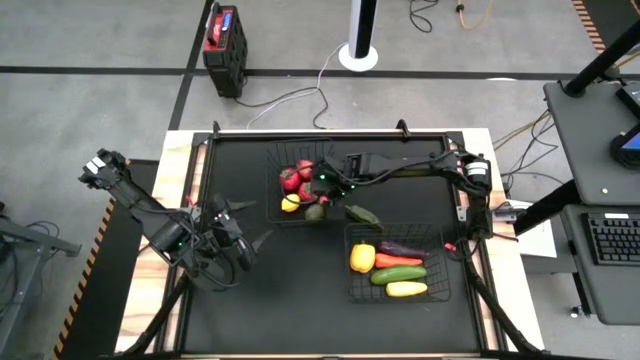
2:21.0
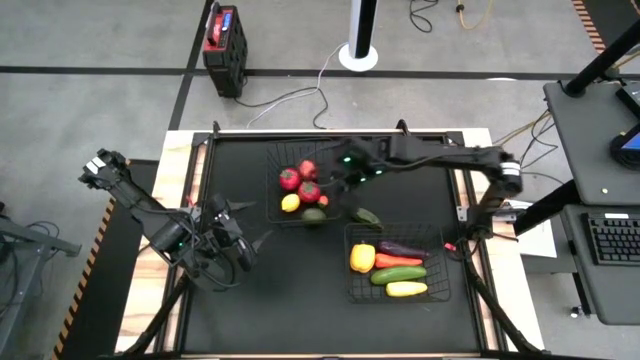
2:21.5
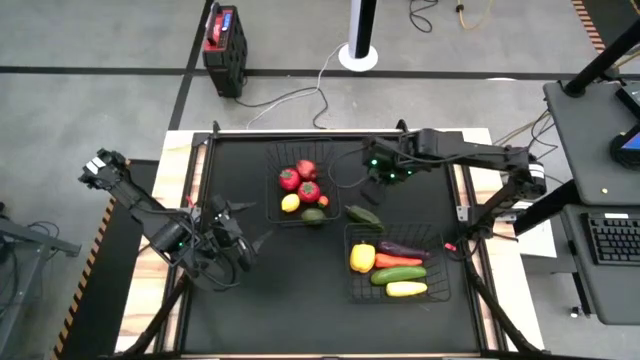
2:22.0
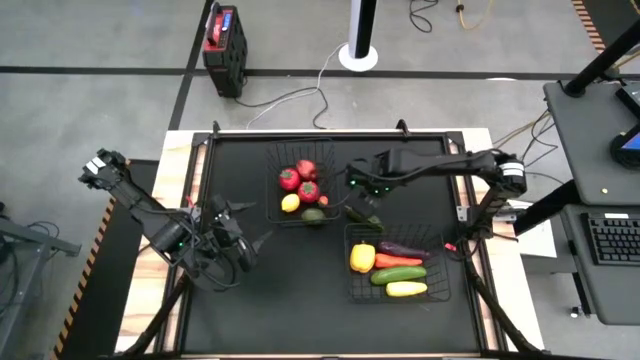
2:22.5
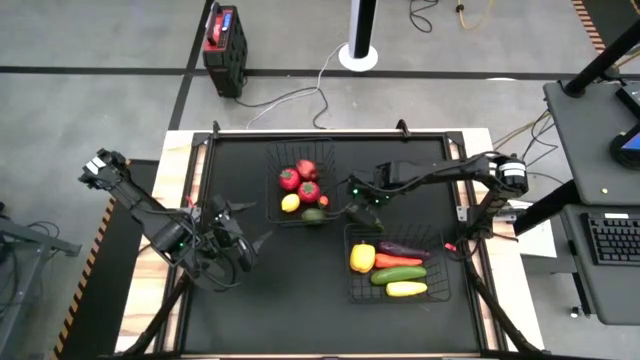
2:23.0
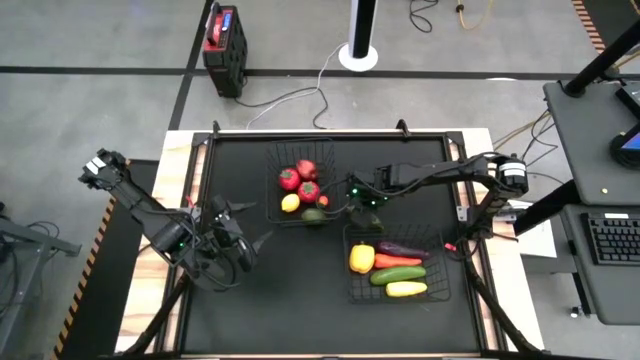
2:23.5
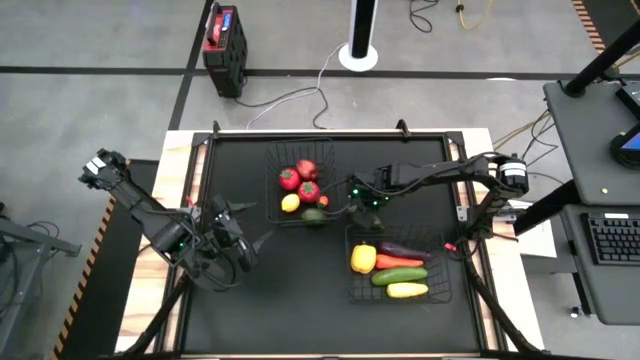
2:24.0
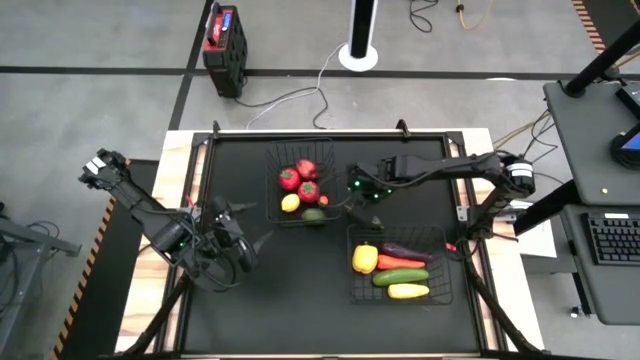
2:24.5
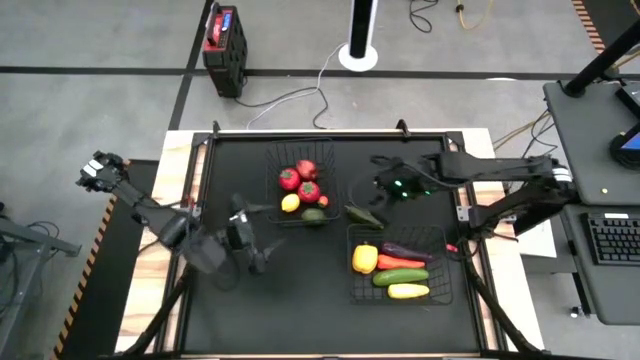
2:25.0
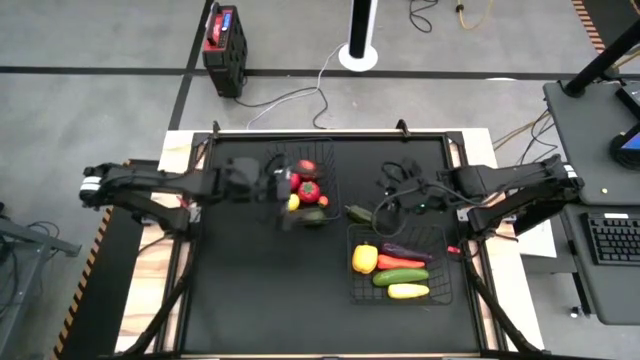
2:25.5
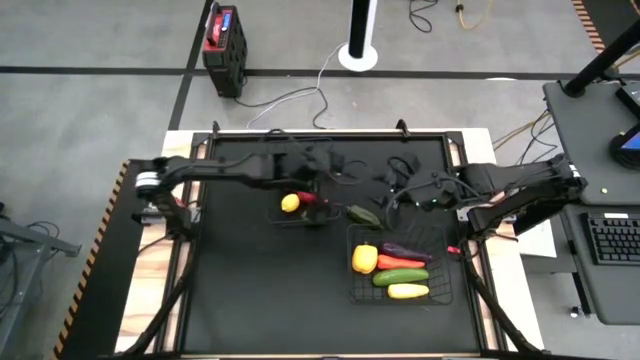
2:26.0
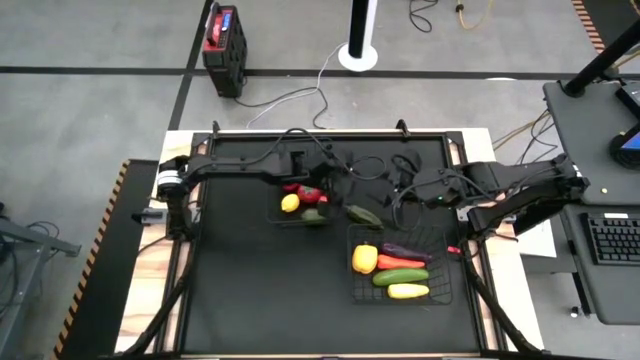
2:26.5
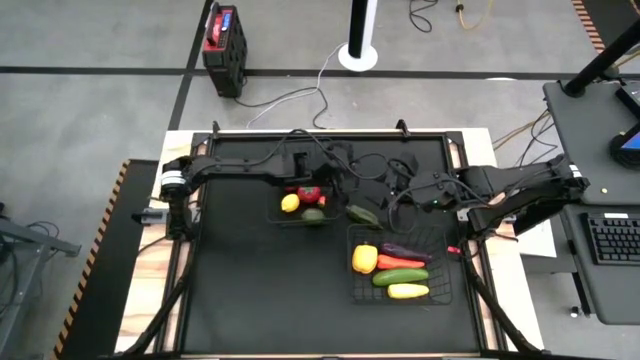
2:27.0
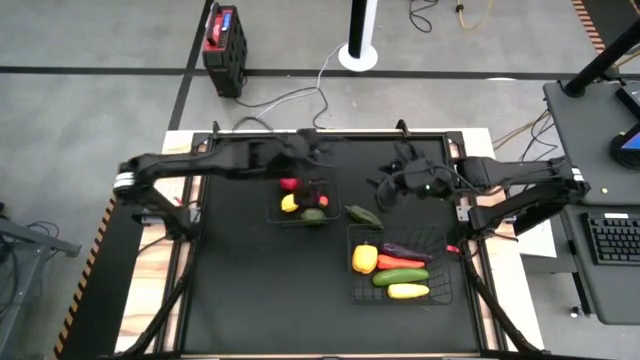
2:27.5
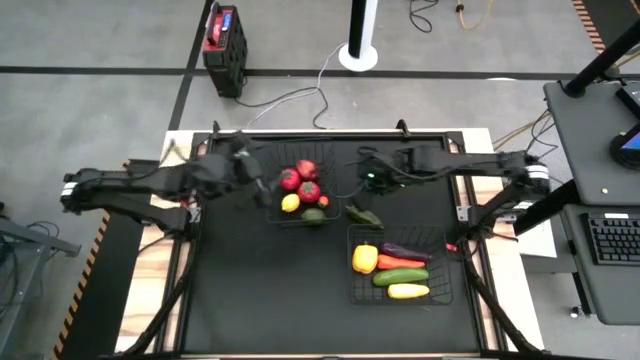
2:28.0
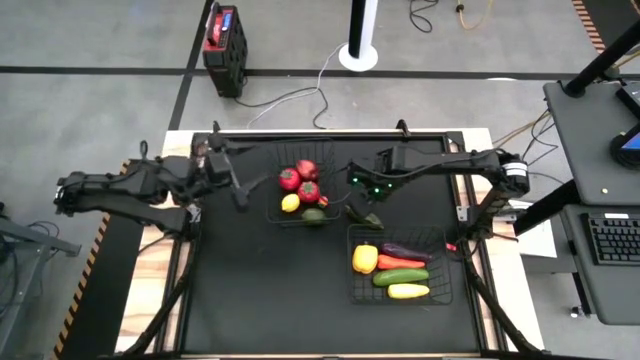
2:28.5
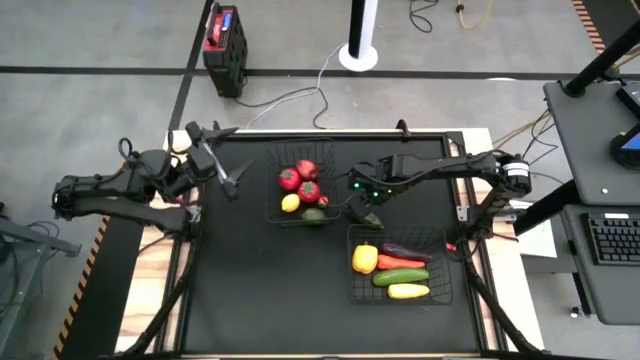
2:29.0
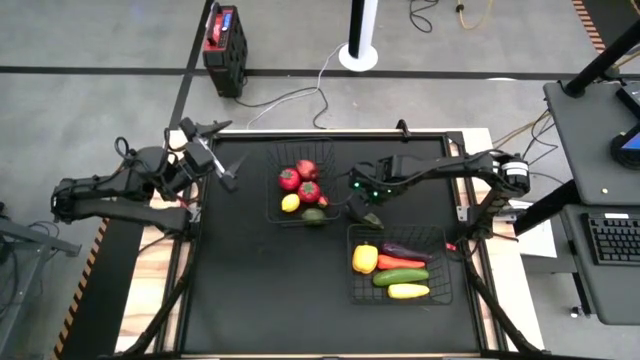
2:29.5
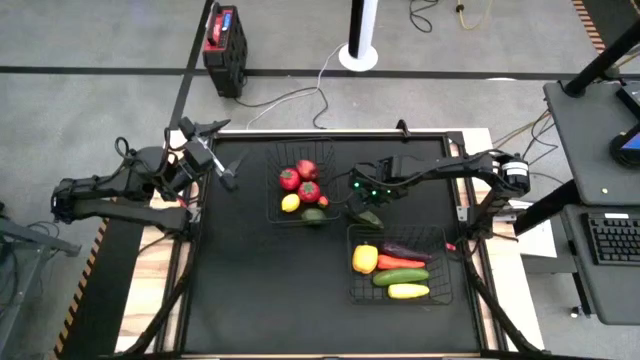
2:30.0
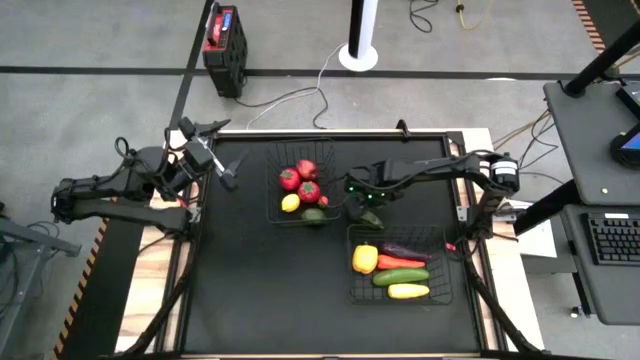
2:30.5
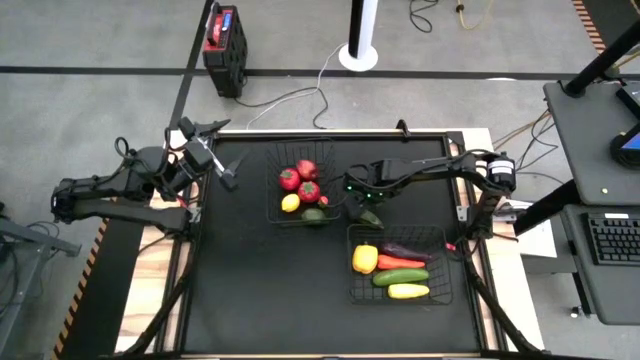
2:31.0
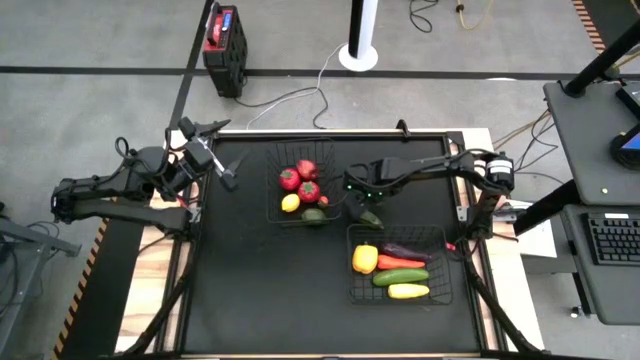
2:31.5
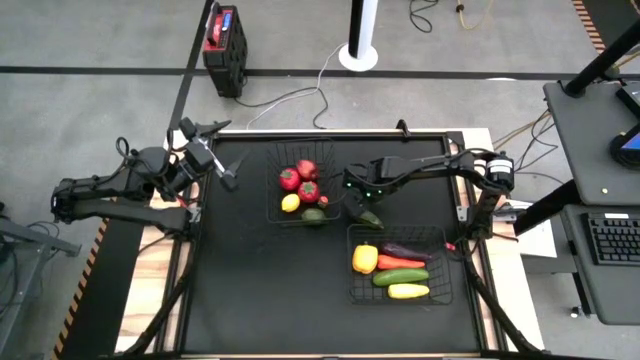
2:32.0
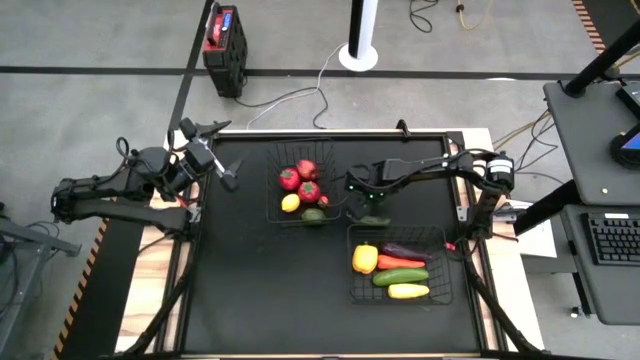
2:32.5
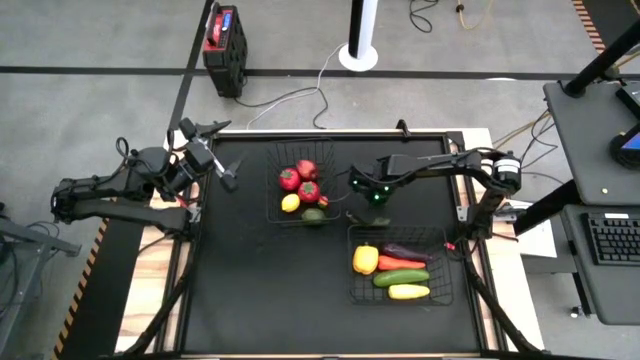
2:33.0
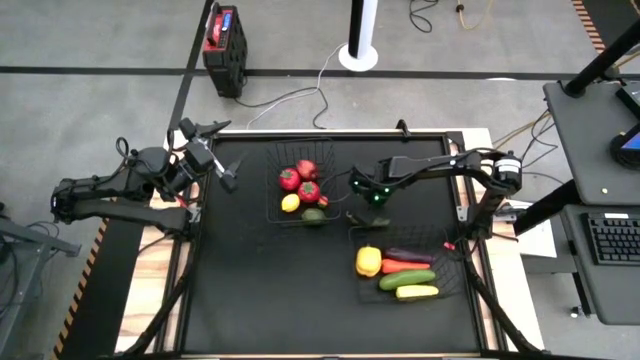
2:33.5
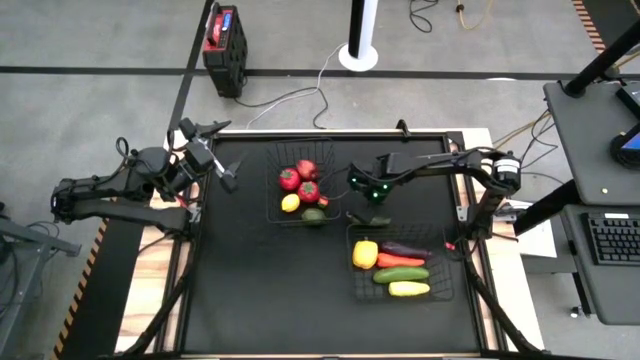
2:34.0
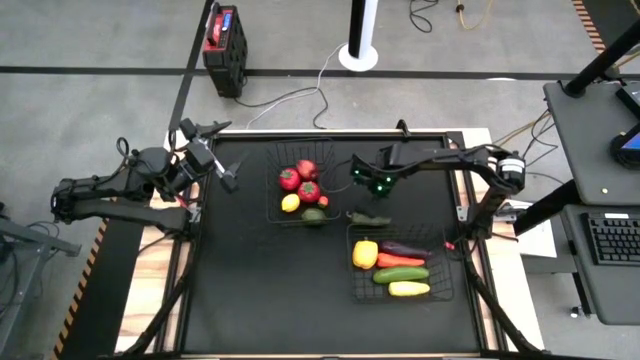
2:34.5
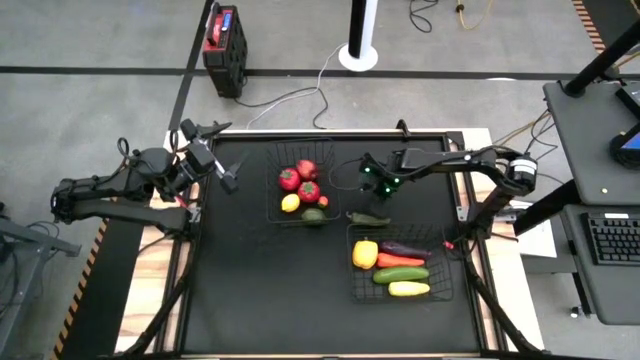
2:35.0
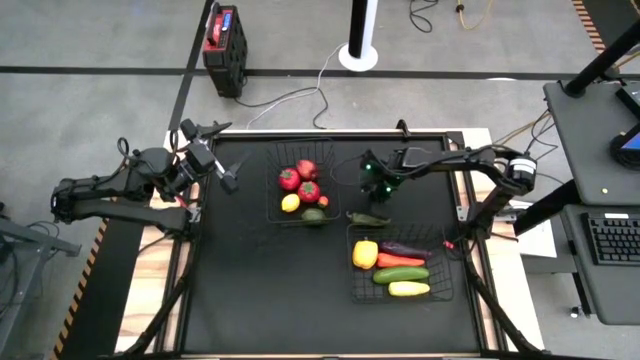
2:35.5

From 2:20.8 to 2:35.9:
Task: Sort produce into baskets
Put the green pepper into the bottom black wire basket

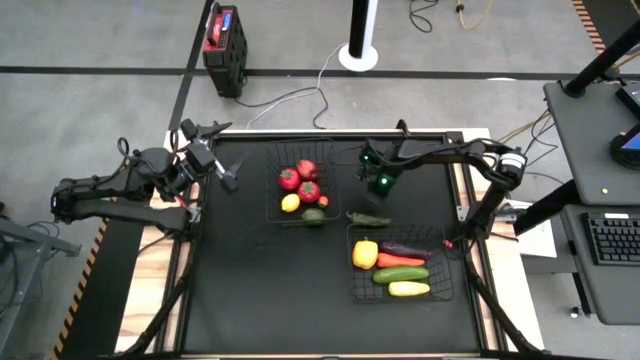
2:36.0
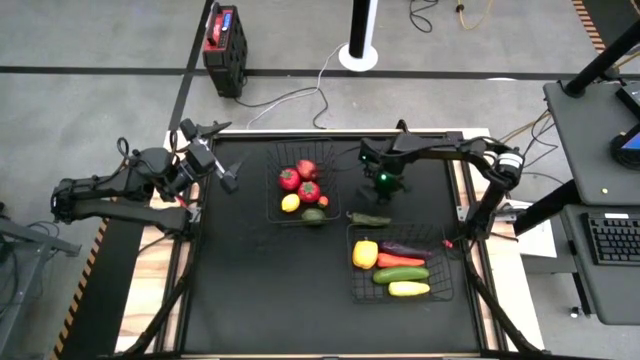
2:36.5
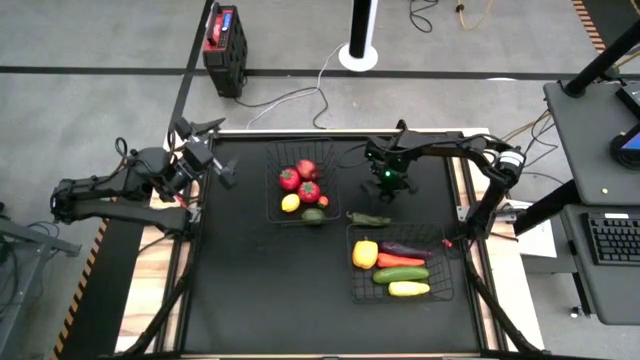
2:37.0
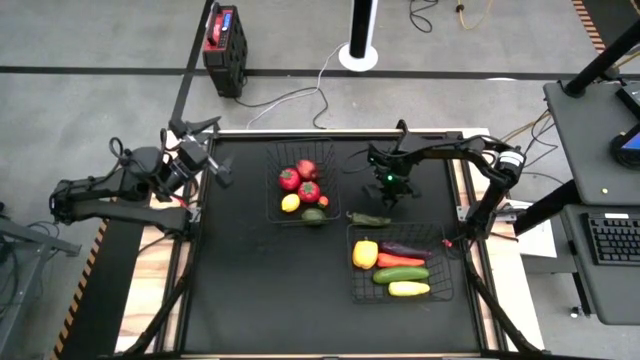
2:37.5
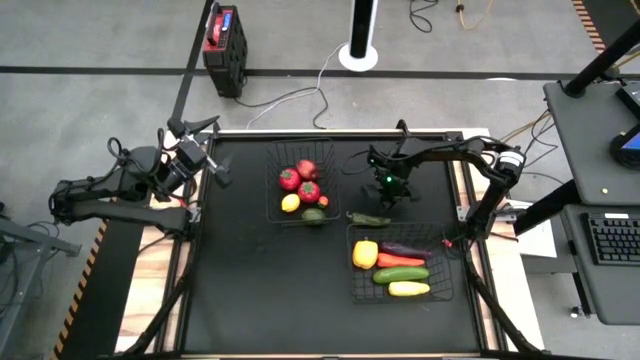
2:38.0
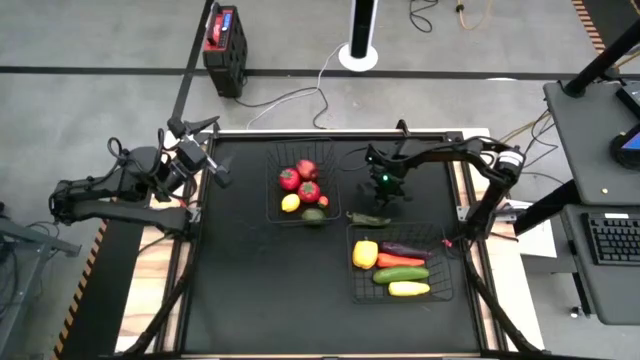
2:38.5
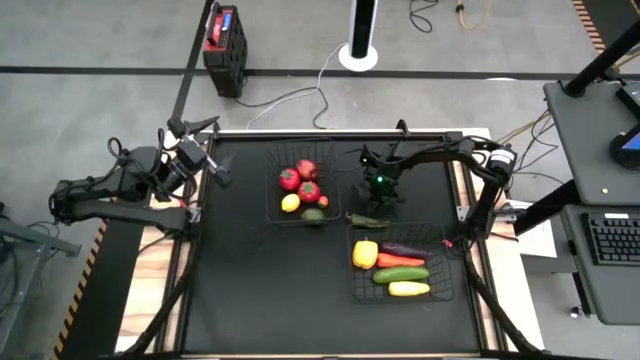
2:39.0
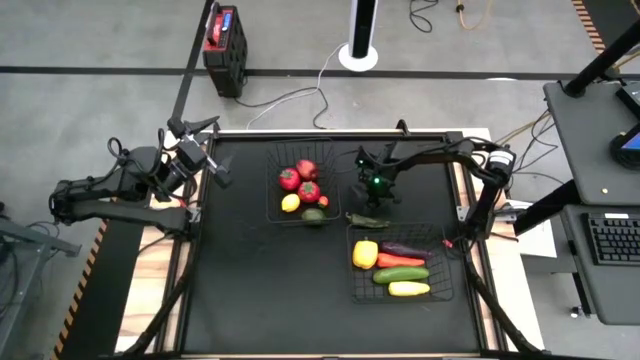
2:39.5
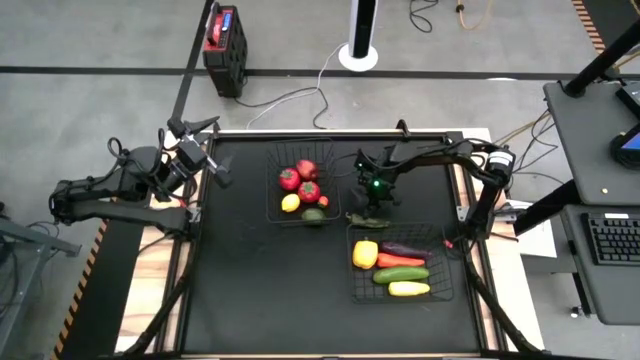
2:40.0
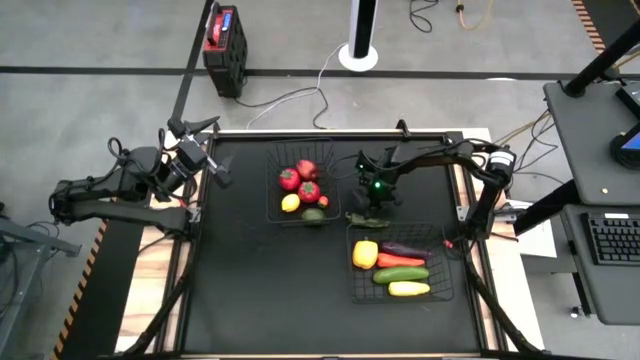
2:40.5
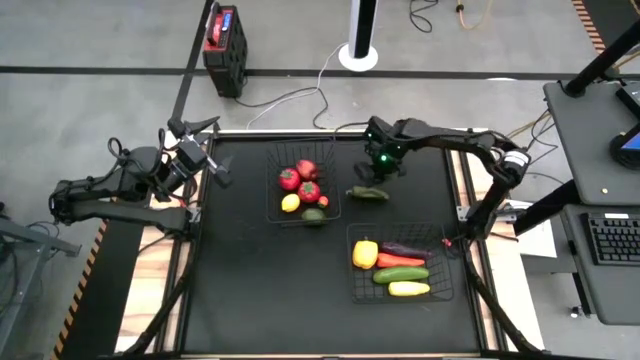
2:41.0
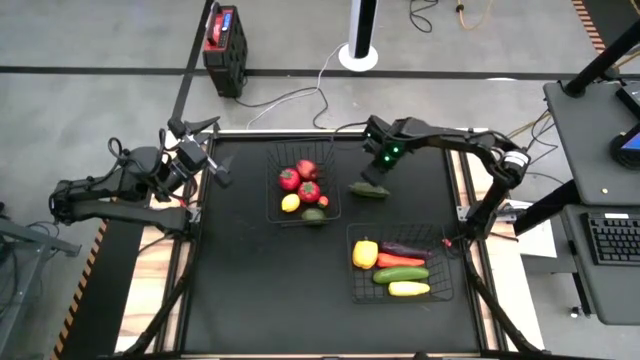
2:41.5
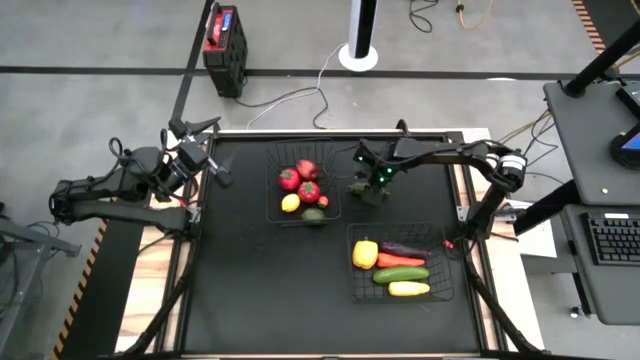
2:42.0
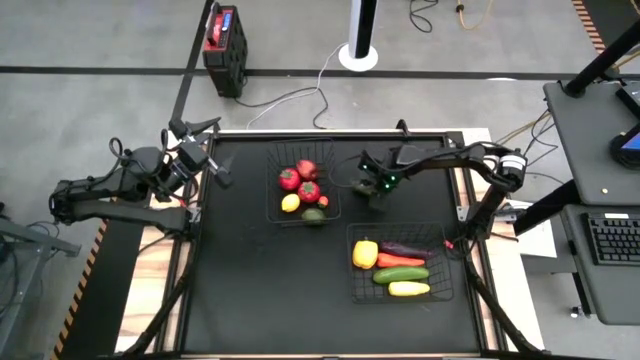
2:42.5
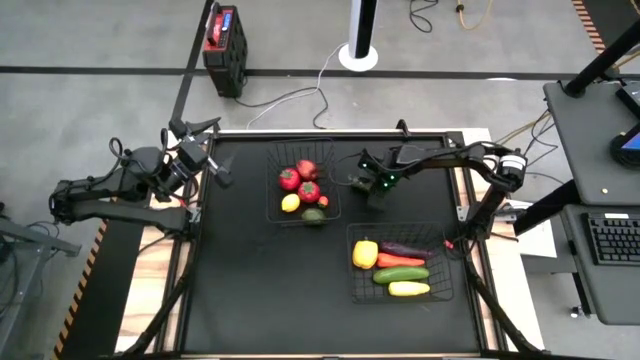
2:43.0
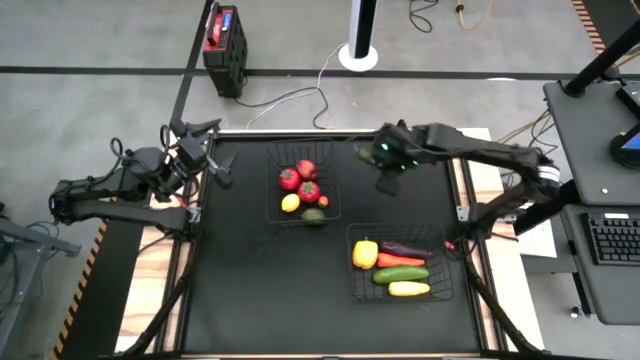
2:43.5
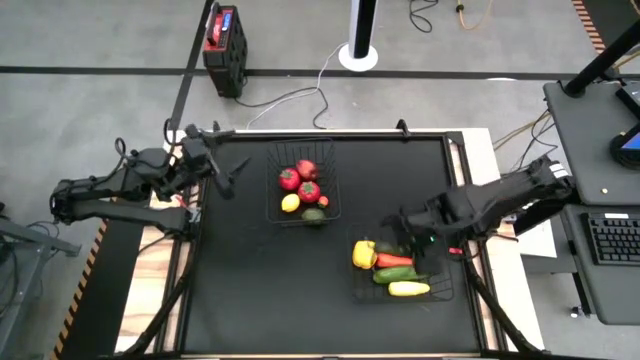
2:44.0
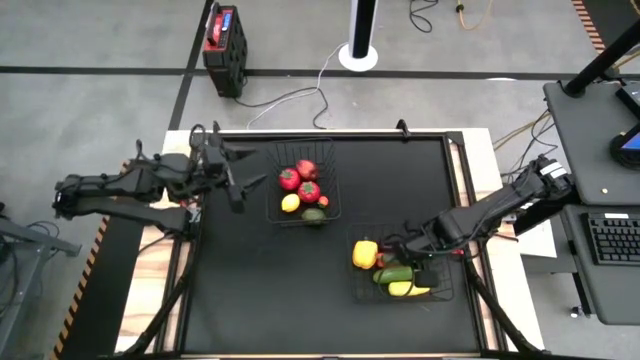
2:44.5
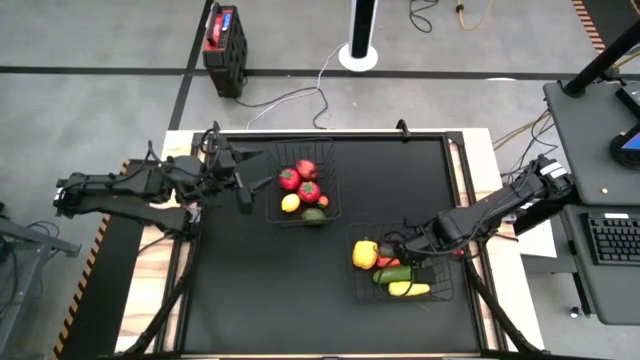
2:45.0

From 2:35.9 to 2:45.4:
Put the green pepper into the bottom black wire basket
